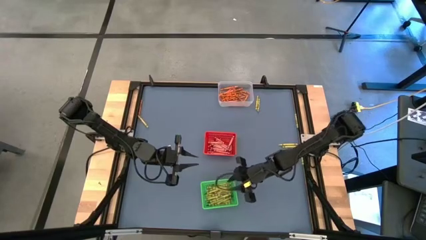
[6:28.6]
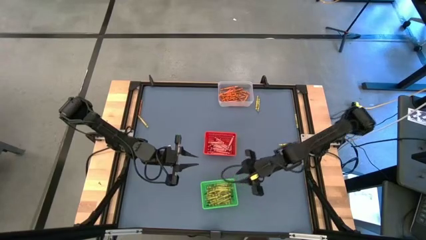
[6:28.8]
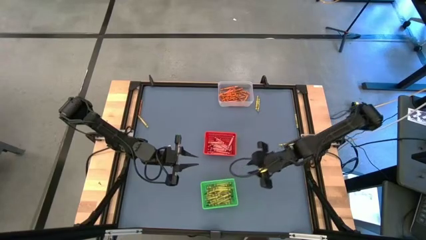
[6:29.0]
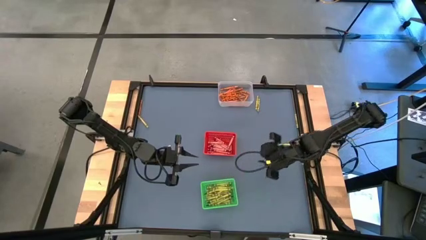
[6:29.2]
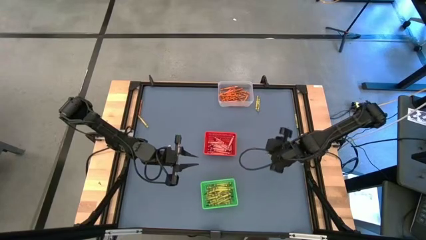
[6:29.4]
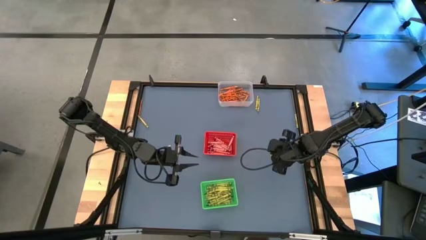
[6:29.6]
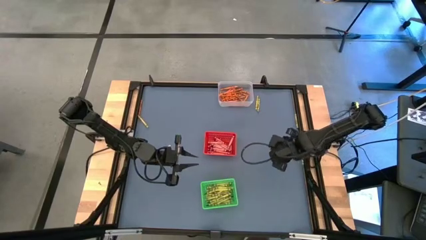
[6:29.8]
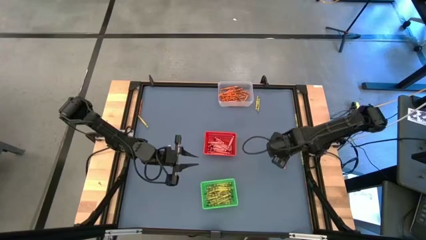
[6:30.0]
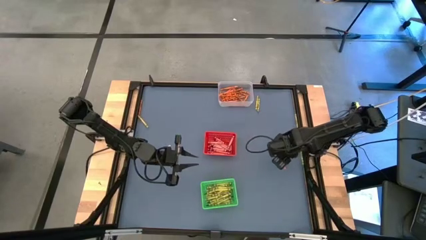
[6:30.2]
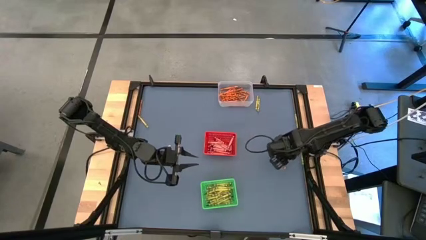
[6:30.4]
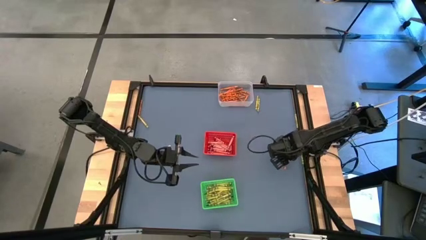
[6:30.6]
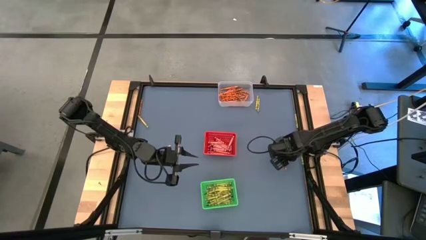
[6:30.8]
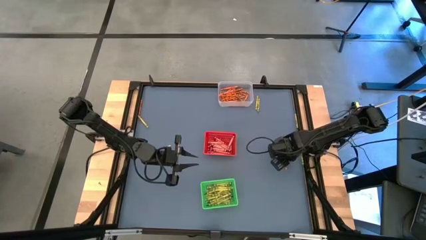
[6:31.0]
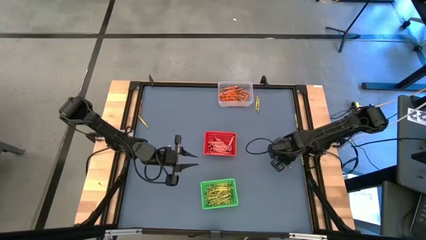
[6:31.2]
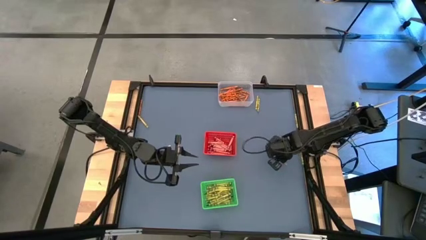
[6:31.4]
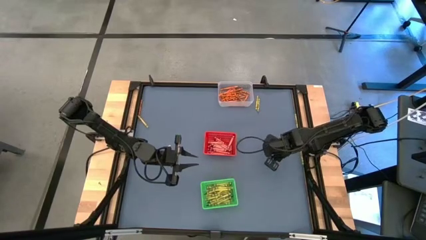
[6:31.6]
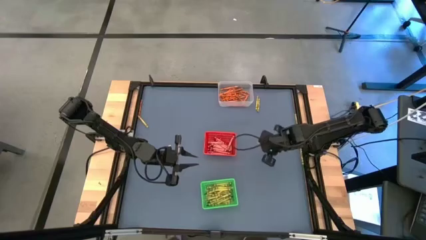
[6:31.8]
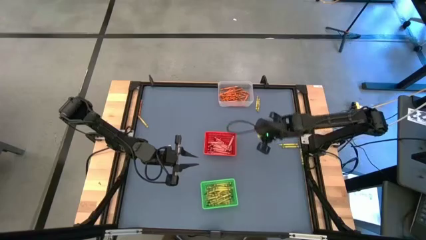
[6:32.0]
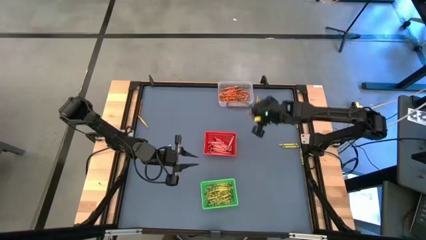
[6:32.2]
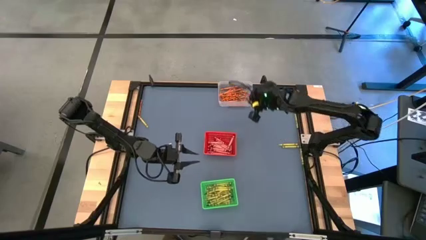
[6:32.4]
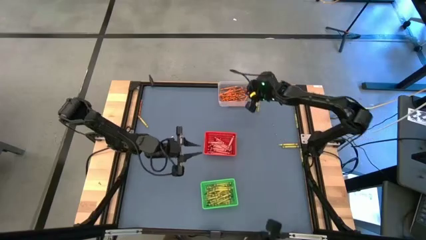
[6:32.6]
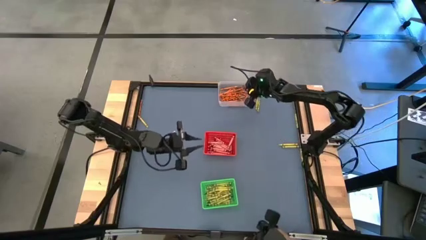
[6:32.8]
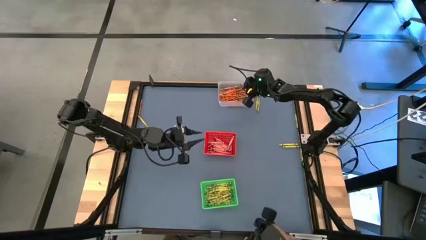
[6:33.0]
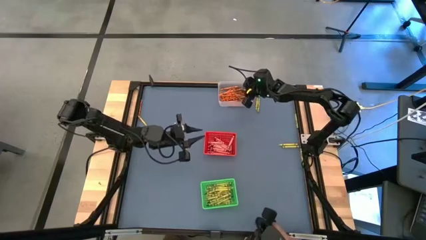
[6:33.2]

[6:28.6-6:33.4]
Task: Sort crayons
Put the orange crayon into the transparent bin

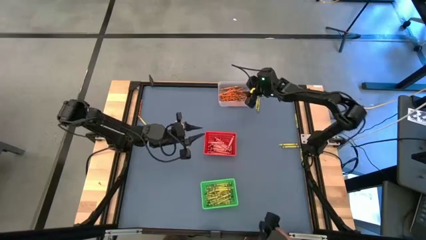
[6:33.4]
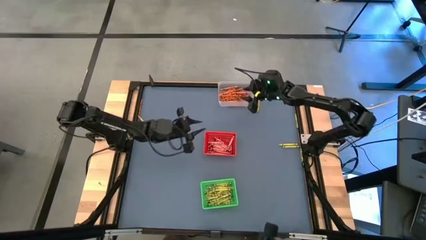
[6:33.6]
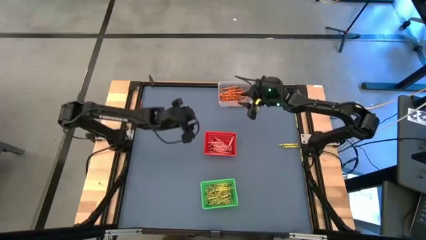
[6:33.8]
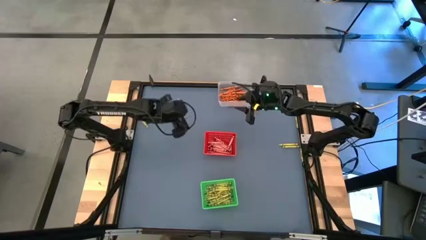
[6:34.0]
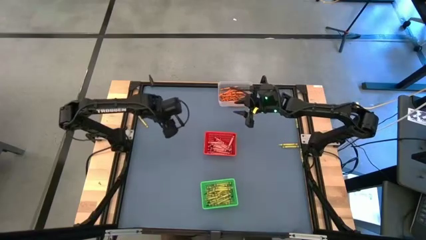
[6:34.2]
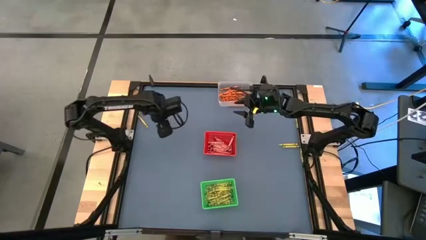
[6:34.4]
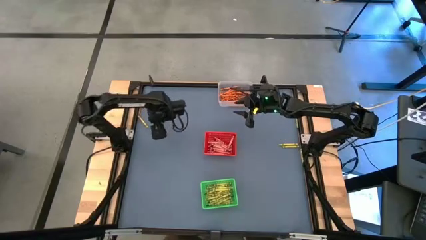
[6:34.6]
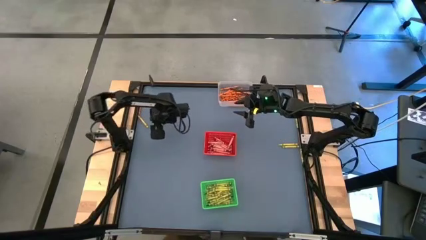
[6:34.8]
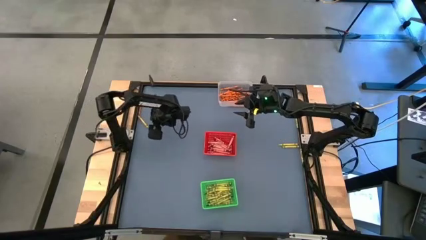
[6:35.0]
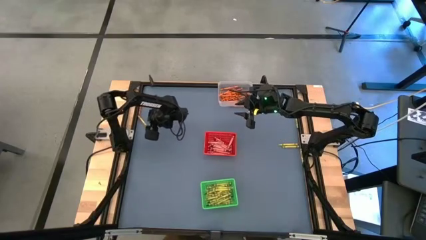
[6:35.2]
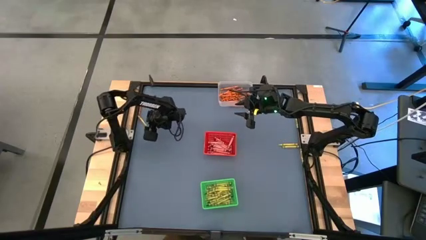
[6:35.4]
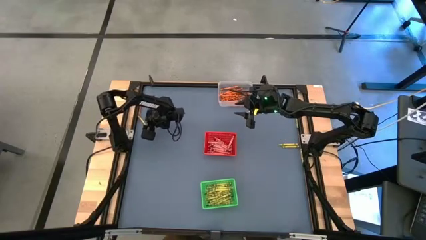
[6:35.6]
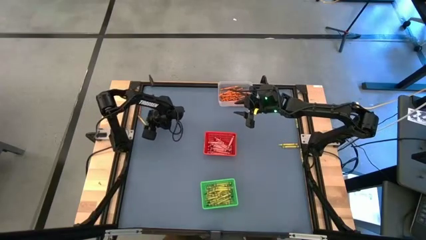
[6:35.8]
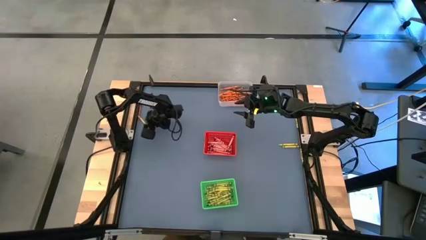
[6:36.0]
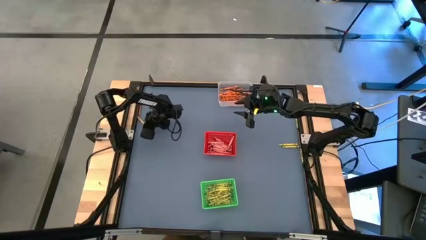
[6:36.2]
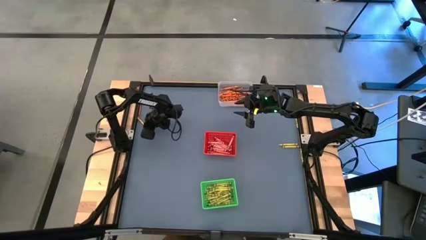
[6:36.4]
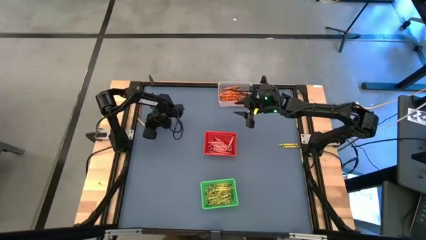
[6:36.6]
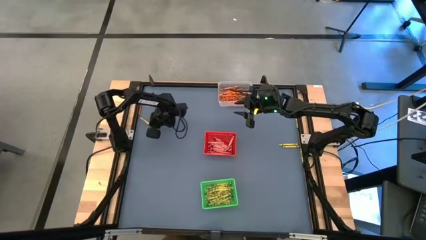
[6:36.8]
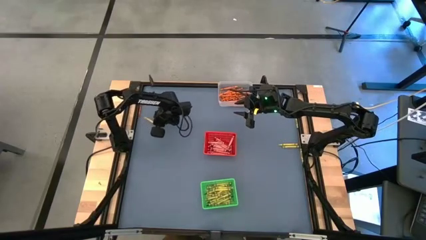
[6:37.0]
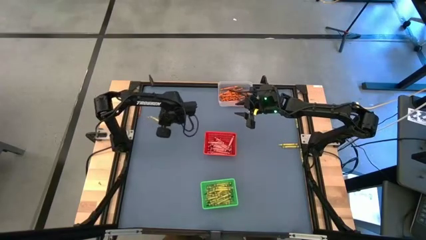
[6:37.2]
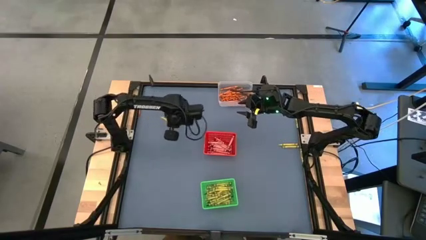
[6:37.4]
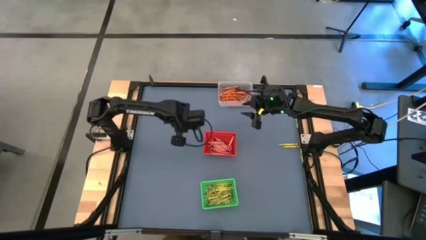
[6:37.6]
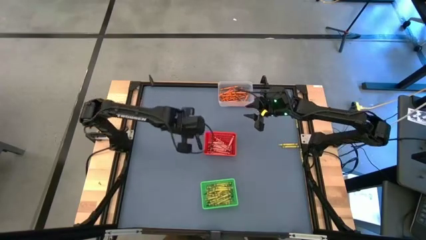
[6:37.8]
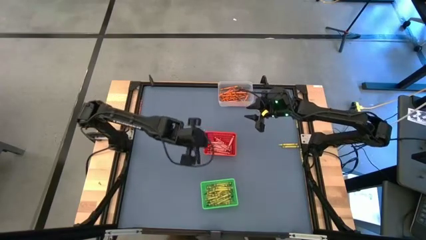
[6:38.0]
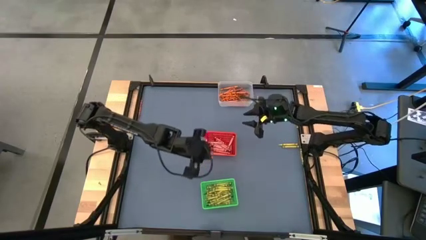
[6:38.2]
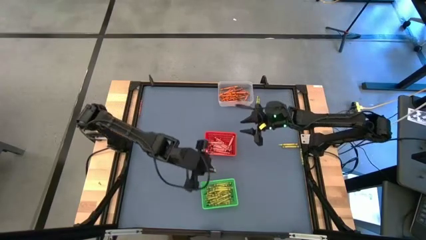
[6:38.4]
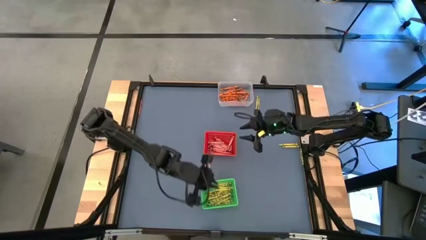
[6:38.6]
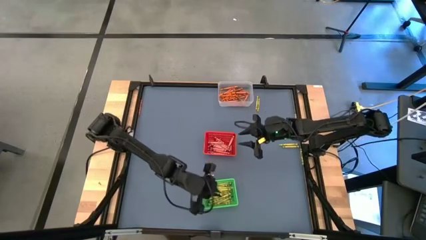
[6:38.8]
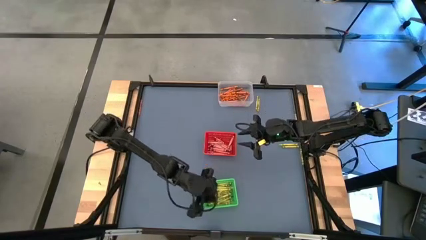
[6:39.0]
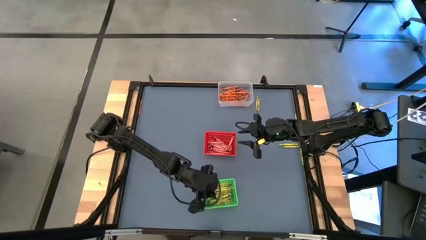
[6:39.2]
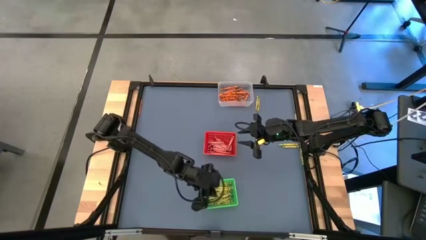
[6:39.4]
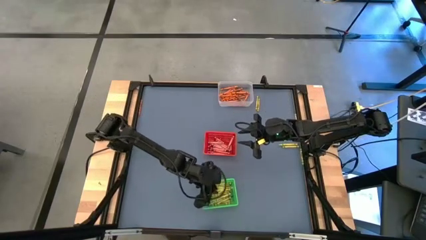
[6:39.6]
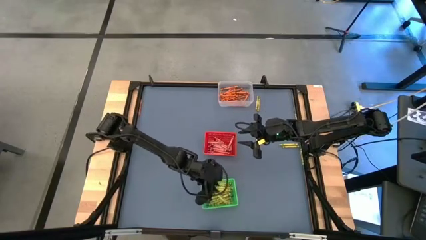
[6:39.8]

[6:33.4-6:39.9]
Put the yellow crayon into the green bin

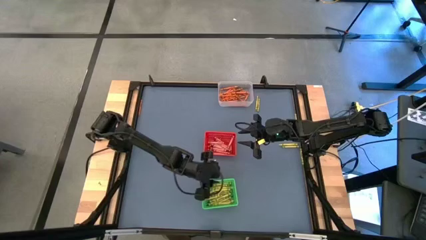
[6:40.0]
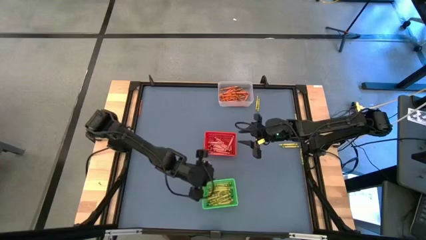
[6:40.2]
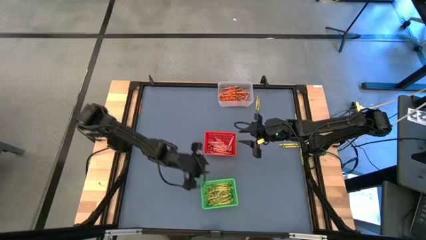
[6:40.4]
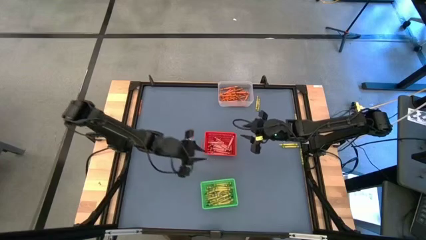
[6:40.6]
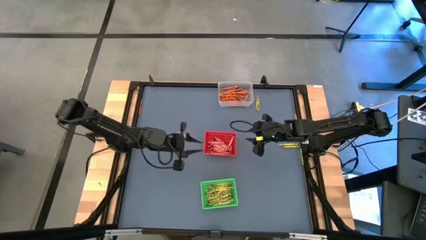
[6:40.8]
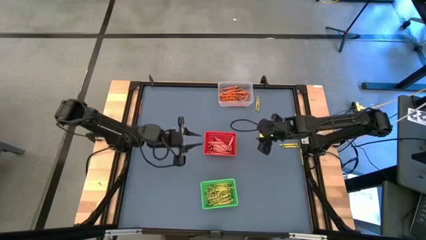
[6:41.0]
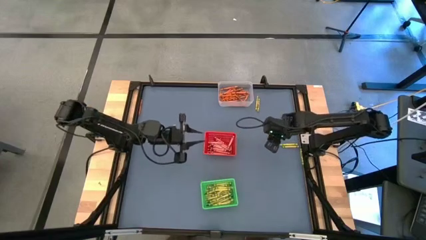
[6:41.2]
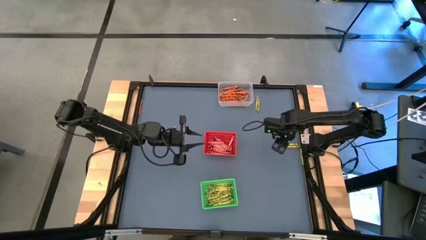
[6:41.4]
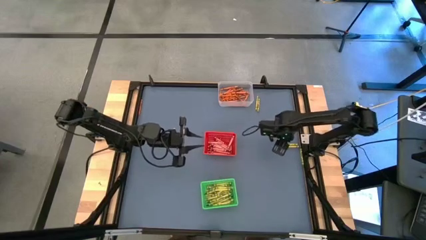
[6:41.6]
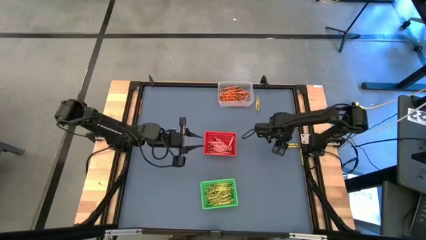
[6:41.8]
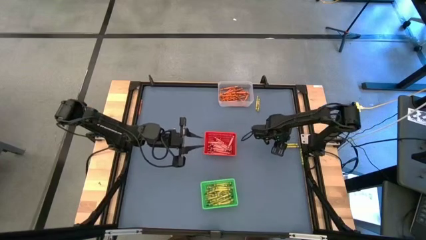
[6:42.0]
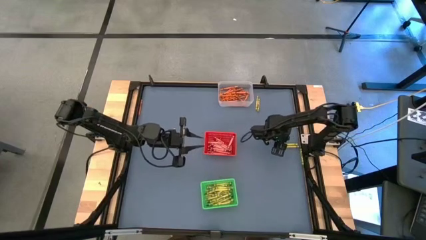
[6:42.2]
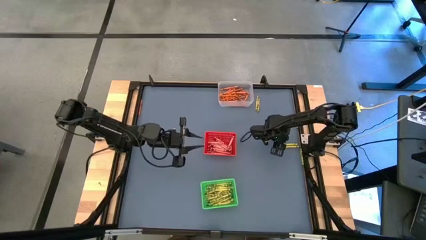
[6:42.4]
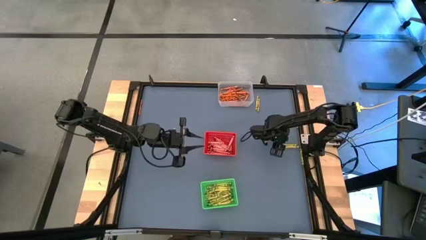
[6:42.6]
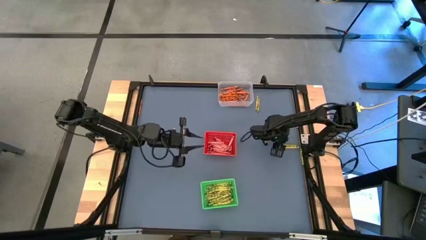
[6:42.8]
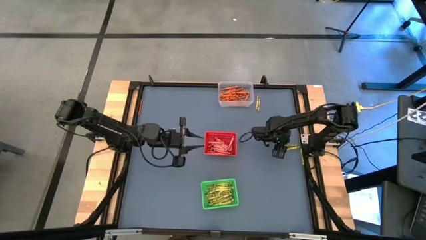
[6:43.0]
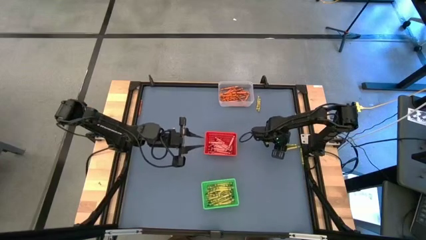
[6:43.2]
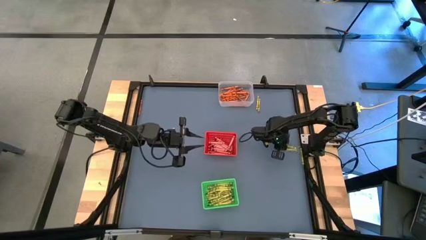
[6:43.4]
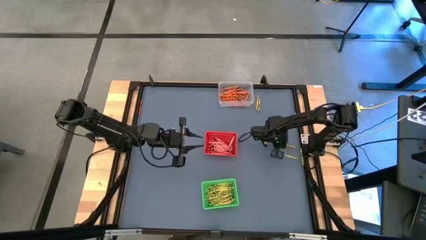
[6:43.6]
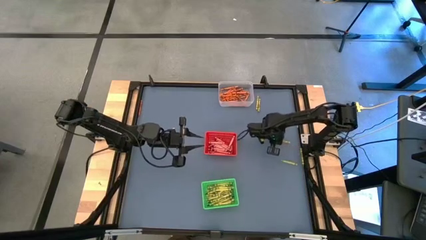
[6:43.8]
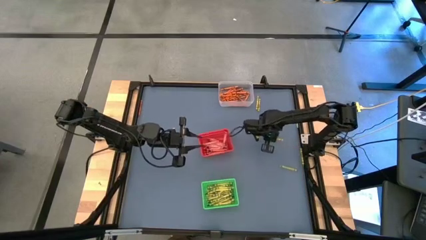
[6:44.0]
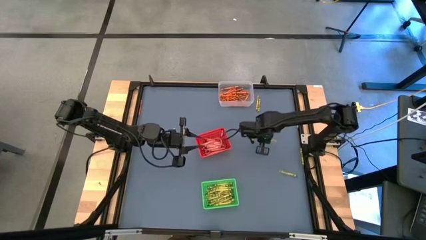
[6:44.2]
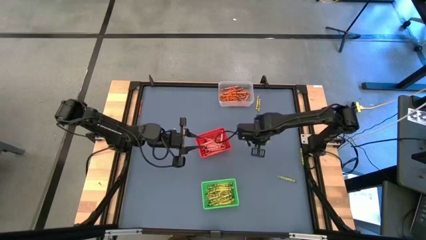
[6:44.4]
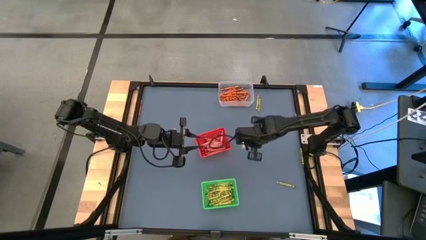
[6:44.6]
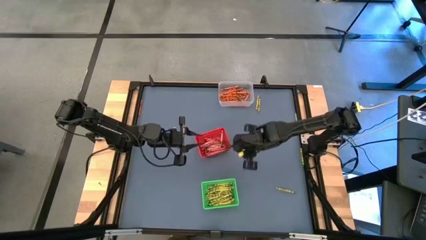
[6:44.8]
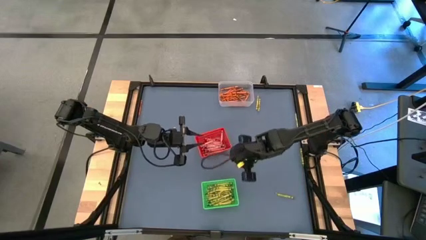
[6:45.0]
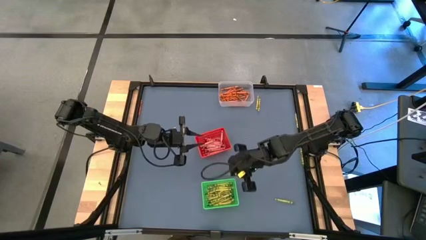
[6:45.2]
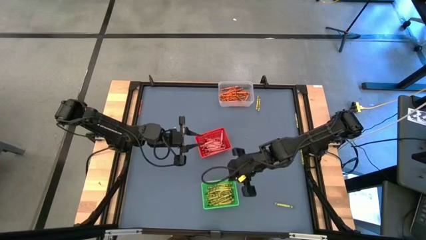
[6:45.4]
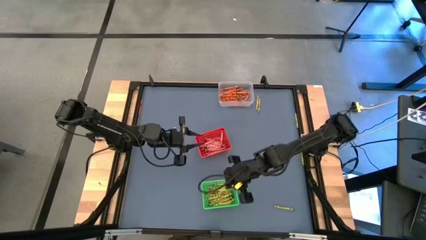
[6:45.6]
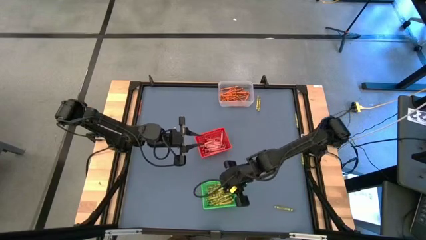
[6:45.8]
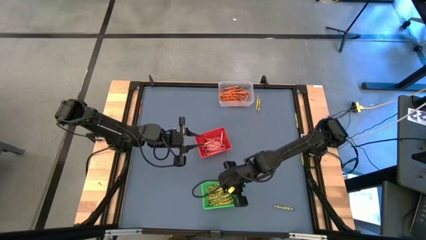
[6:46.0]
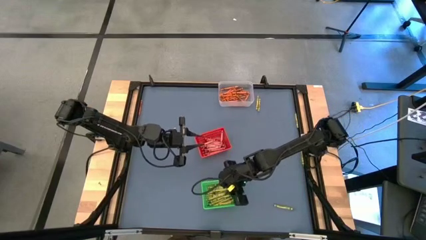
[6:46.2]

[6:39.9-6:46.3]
Put the yellow crayon into the green bin
